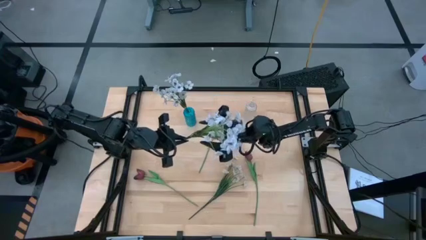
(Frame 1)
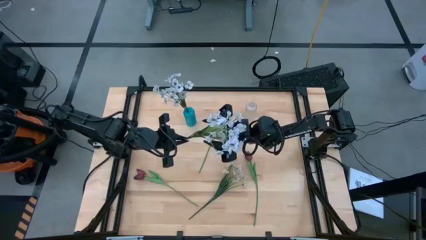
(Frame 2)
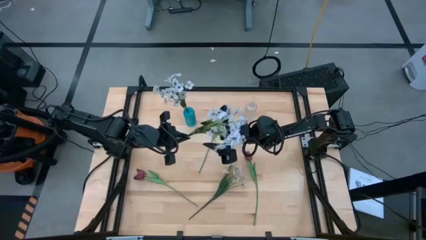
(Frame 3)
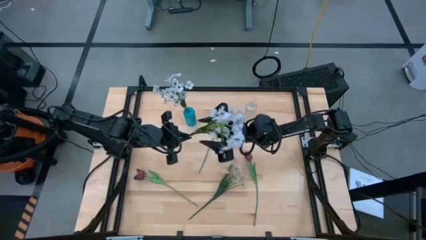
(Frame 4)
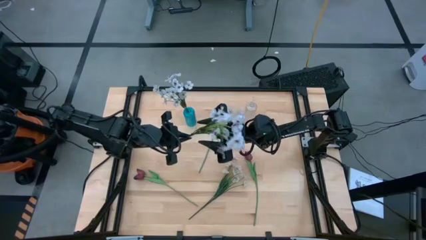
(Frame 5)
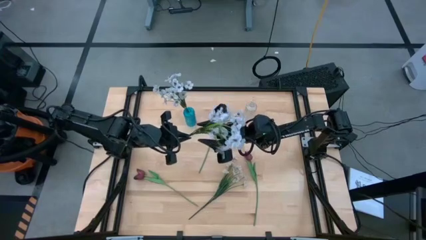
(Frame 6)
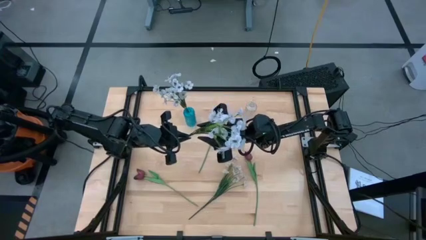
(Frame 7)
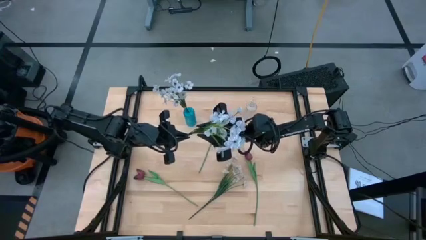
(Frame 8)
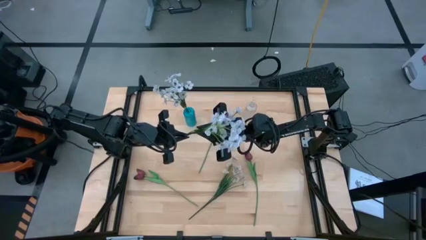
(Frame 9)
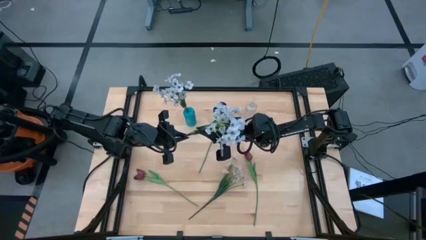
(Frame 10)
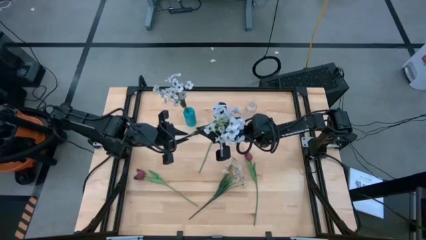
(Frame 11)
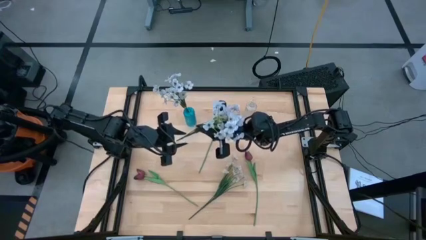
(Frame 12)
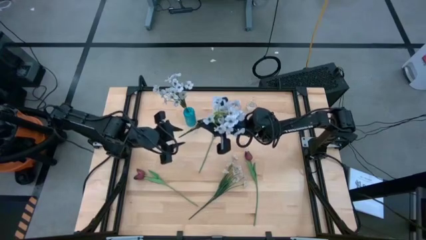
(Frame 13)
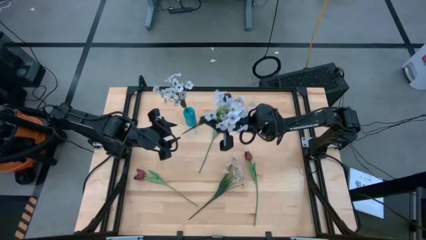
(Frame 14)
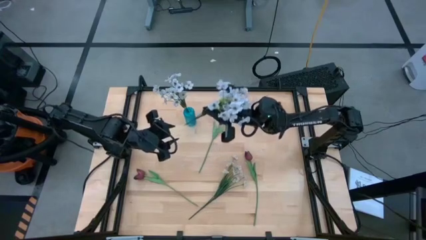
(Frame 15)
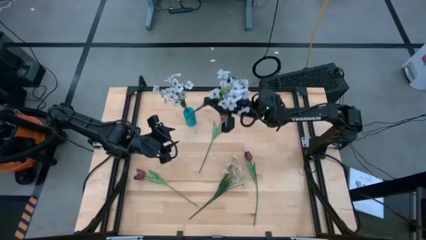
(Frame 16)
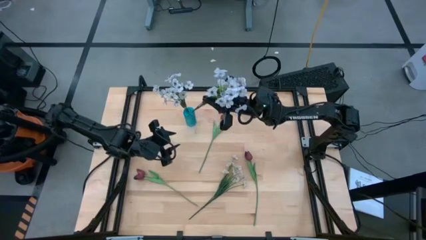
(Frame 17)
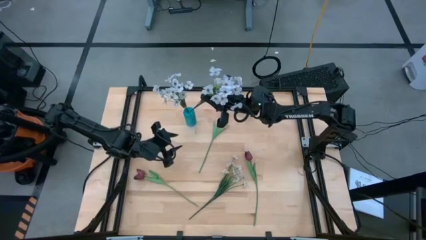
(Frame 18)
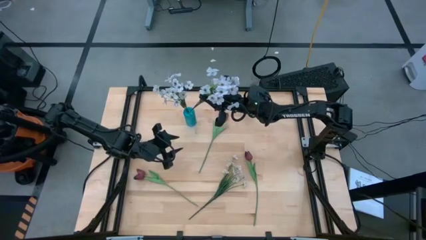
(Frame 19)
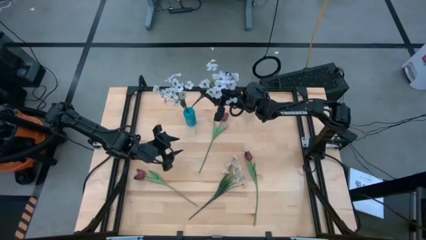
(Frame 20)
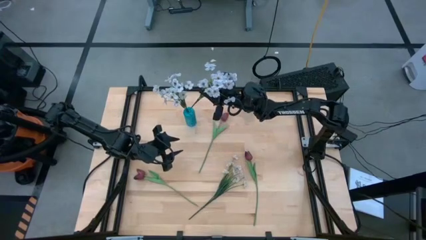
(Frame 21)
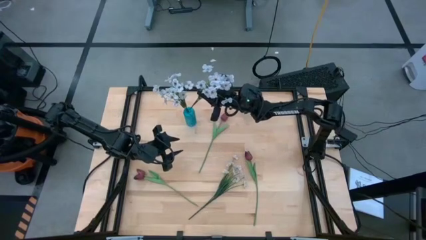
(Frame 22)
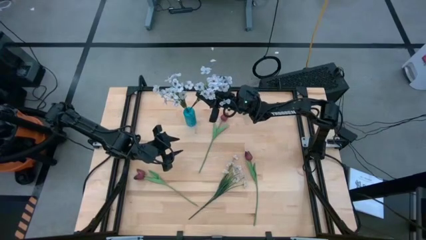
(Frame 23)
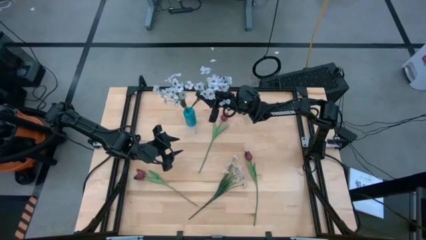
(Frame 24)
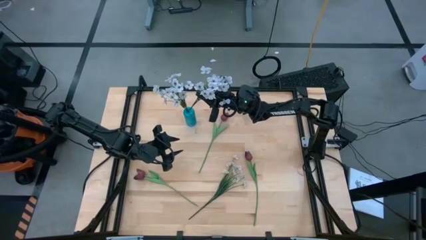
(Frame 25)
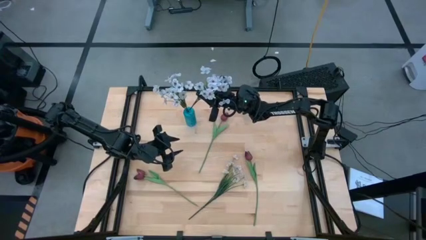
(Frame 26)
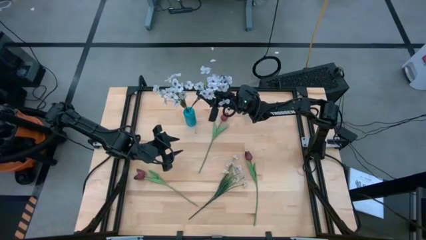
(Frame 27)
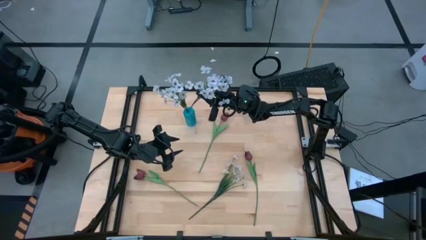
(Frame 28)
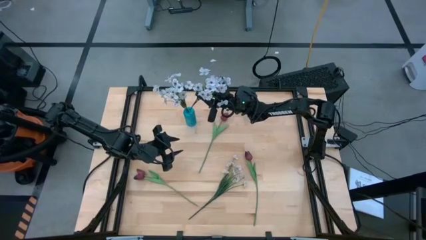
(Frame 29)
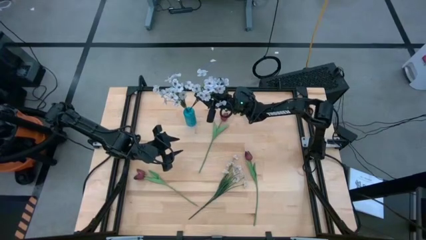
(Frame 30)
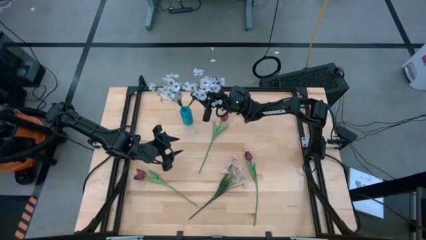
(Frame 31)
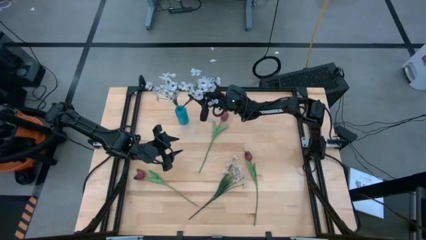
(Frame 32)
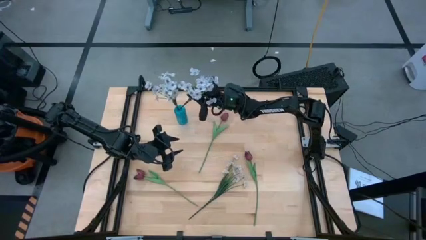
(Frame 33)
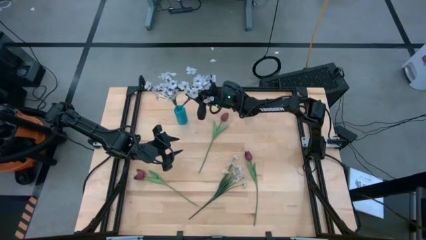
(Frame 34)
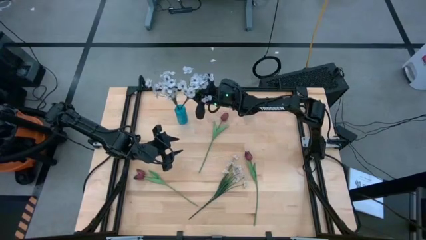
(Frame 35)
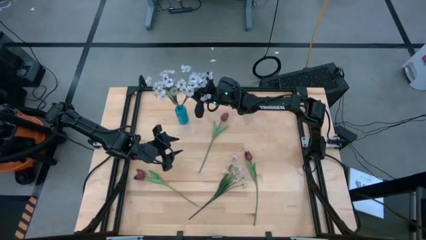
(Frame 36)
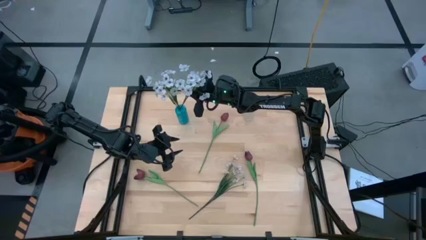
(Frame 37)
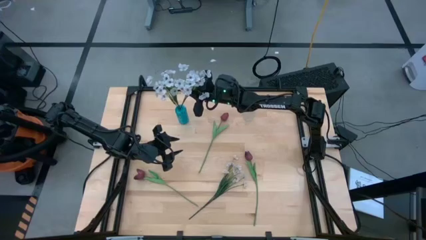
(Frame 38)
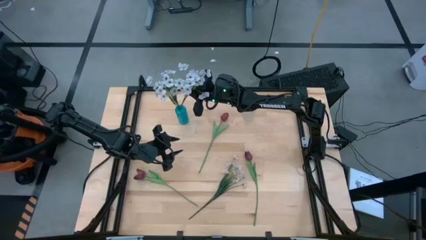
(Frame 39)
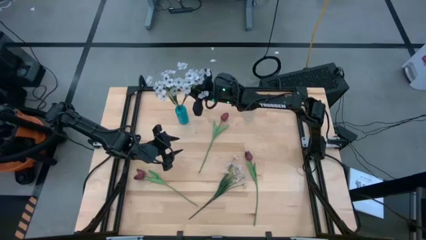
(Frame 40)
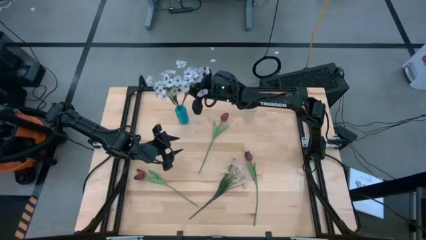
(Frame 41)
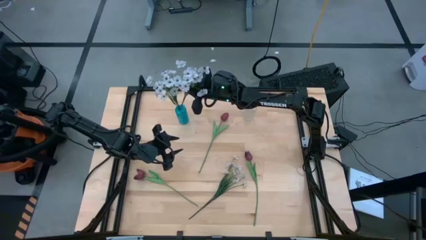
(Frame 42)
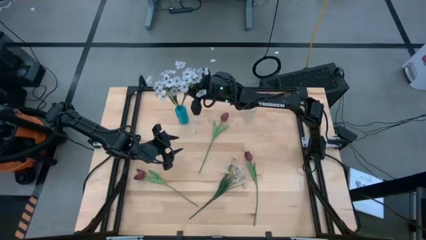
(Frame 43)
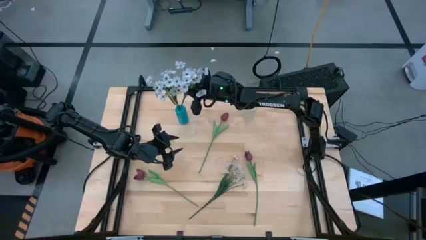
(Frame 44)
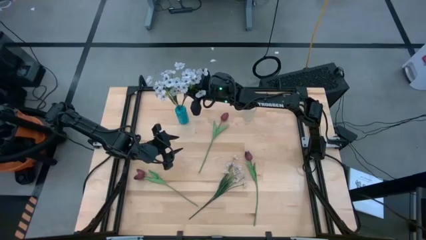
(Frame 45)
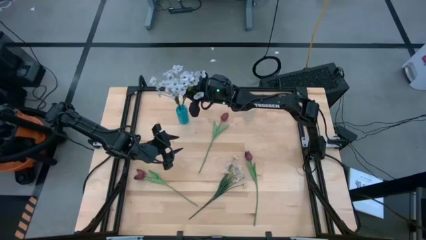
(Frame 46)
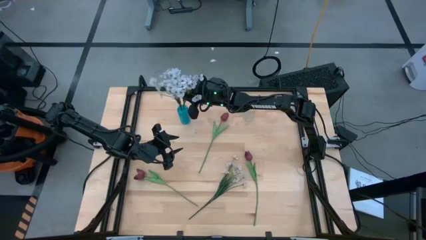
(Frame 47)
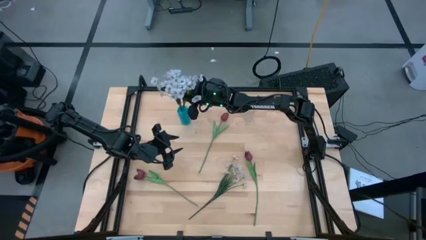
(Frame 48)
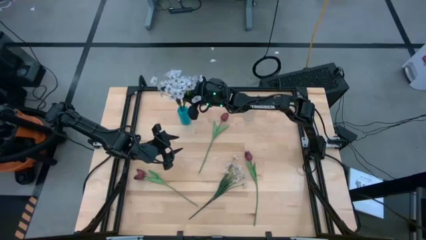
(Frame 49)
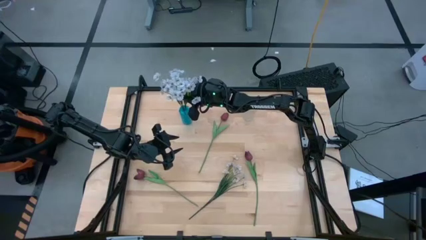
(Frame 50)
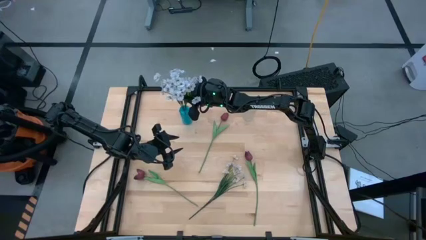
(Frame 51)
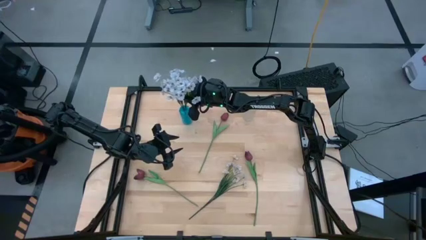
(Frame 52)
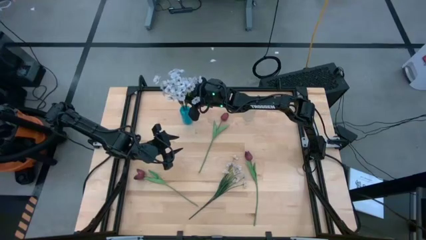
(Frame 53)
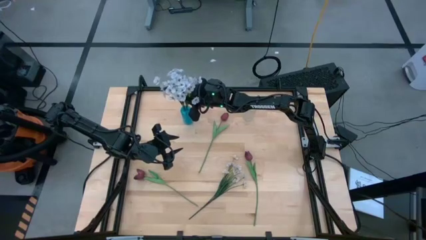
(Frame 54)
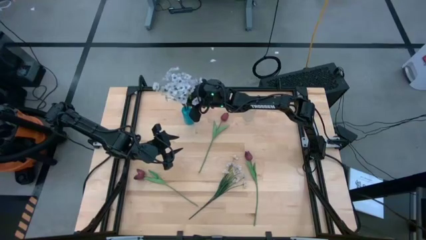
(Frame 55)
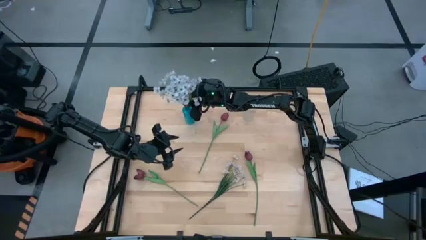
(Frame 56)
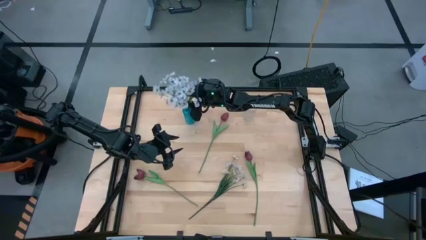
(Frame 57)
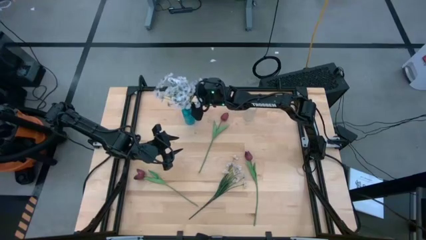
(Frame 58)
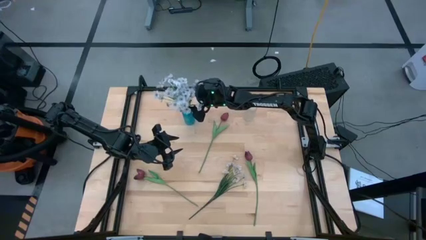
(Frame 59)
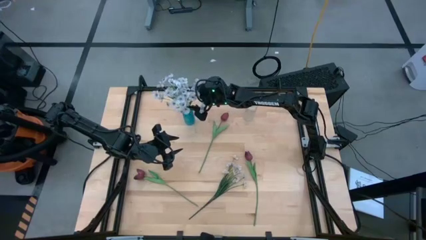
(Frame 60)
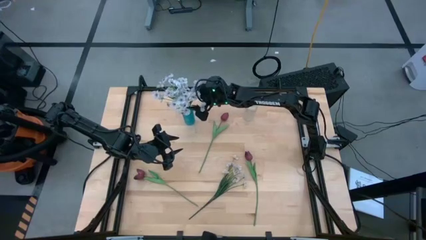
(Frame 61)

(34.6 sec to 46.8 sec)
Task: Sort flowers into vase by color
Put the top white flowers into the blue vase

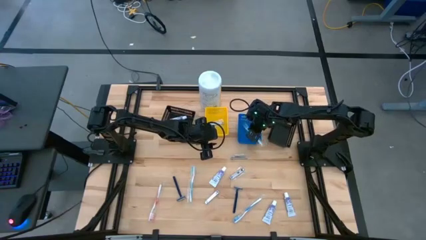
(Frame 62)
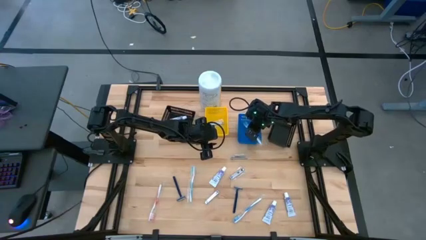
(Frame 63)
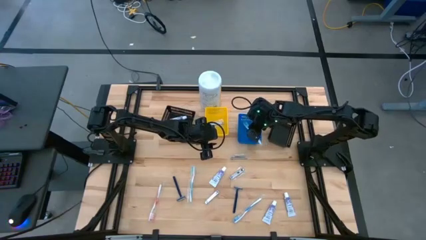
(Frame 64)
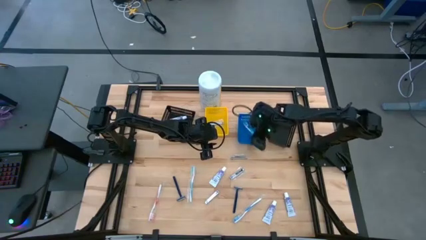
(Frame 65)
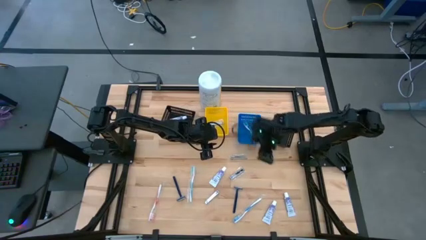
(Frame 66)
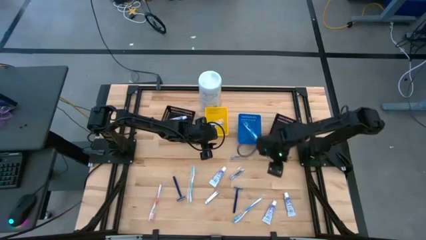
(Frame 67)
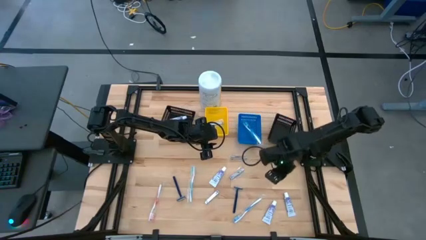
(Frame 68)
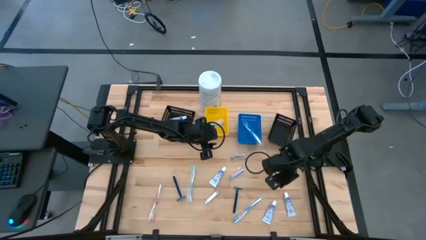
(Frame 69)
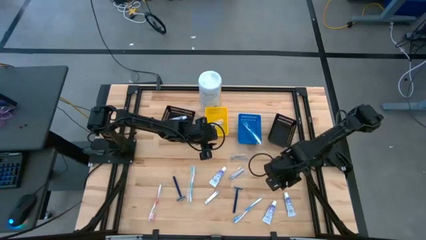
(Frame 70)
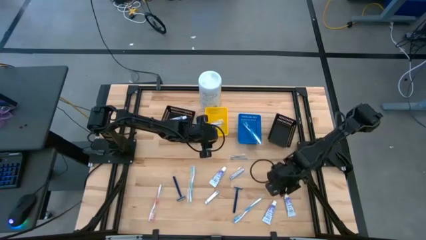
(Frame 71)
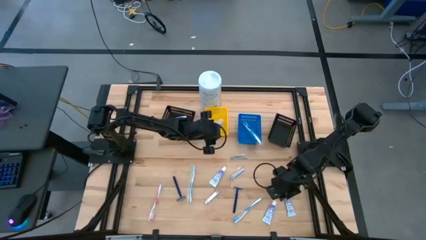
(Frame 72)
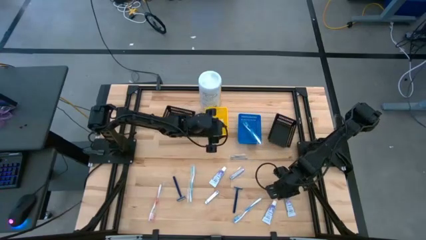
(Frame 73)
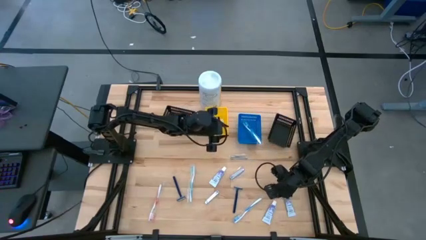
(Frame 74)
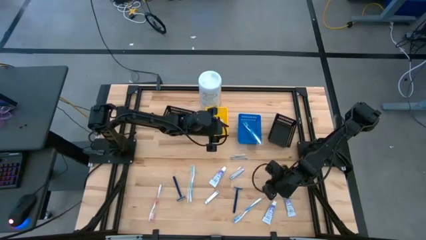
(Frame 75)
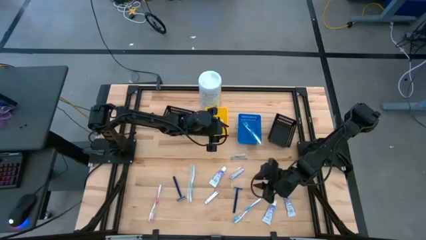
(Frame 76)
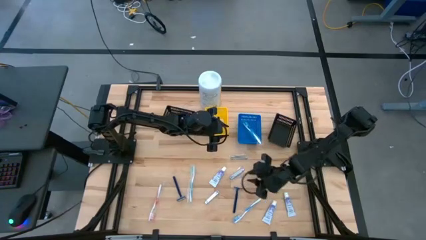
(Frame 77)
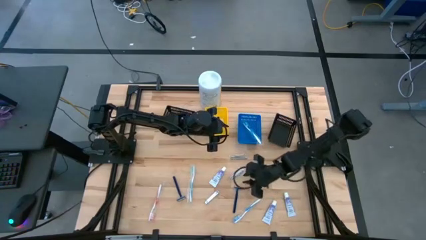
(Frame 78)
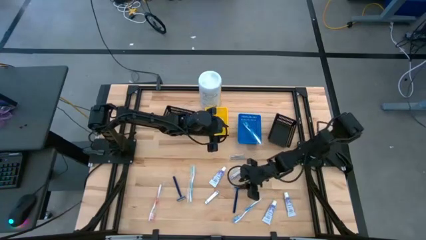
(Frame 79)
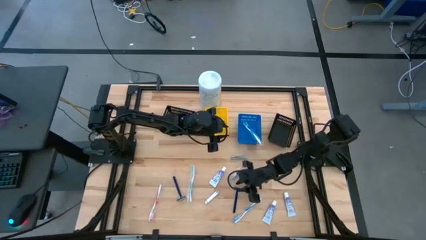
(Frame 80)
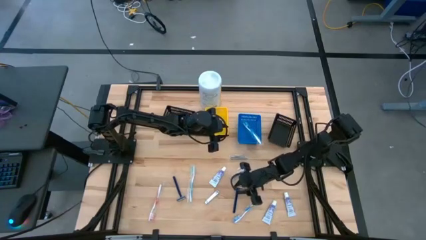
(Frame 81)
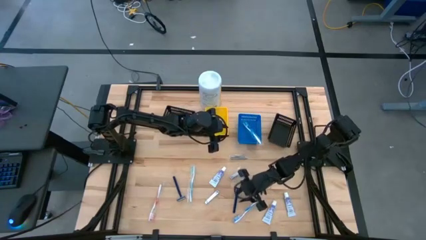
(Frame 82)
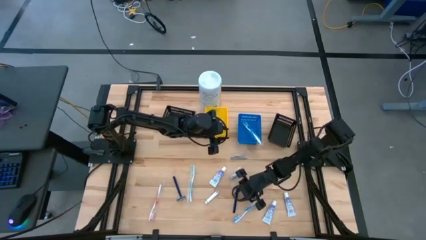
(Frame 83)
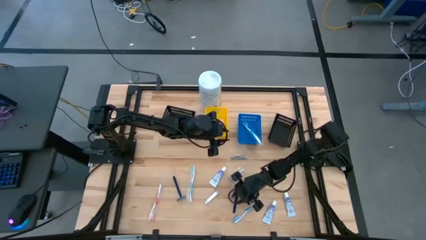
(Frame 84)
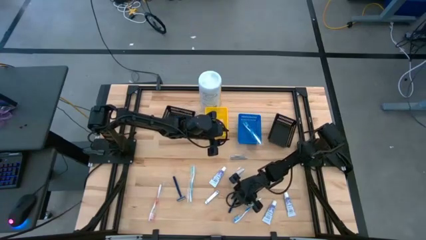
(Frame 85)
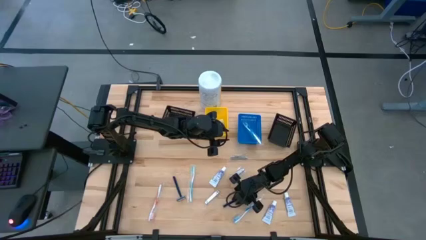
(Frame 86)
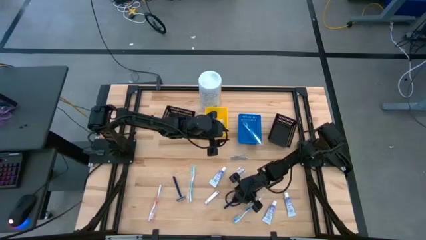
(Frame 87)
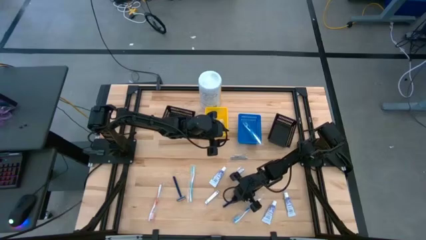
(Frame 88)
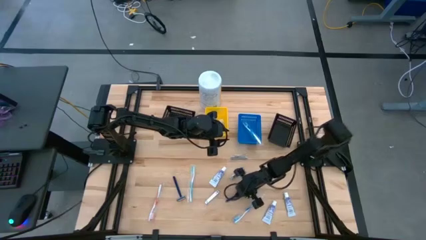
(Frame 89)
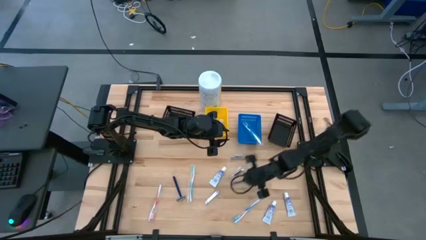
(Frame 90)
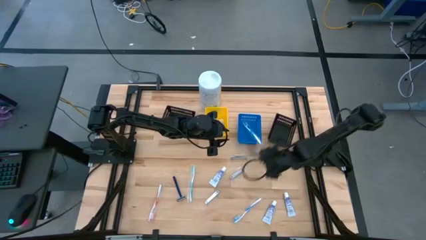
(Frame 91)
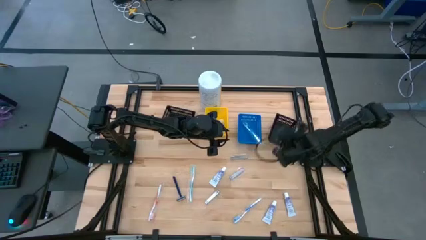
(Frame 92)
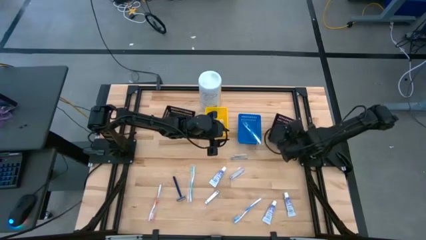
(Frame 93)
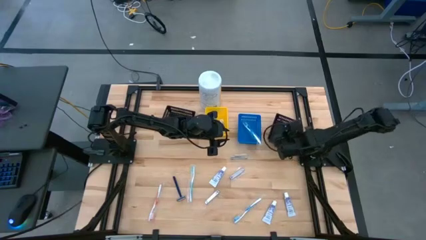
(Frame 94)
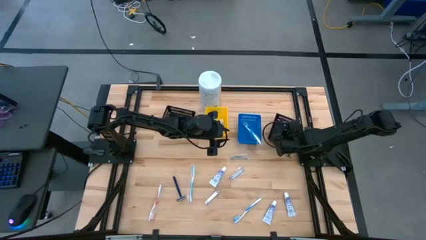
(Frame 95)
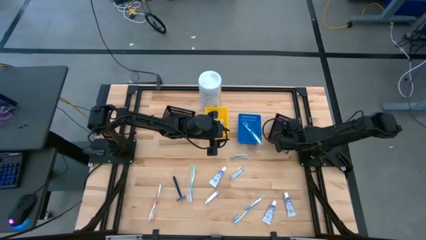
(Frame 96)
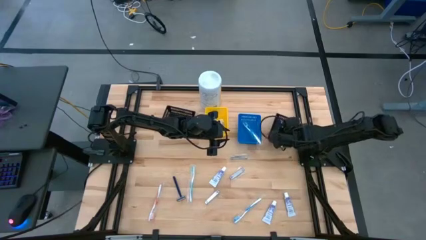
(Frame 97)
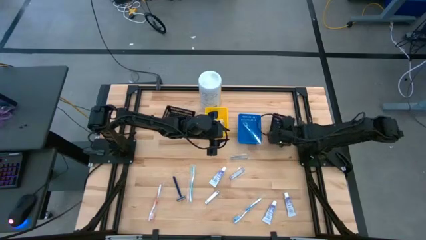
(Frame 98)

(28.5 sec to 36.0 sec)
Task: Pick & Place Travel size toiletries
Put the right blue razor into the right black bin
